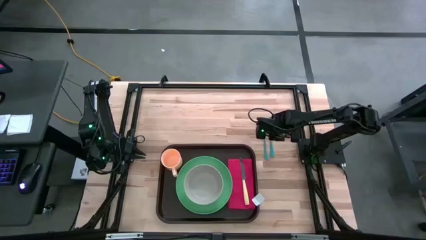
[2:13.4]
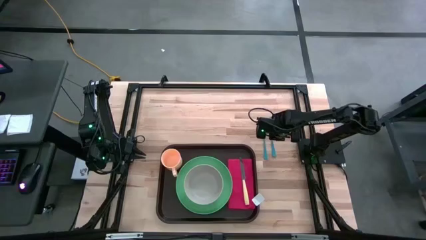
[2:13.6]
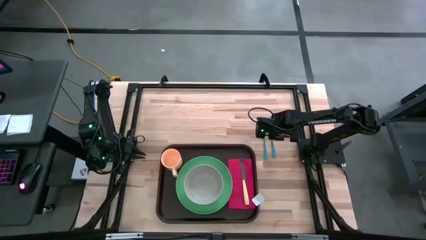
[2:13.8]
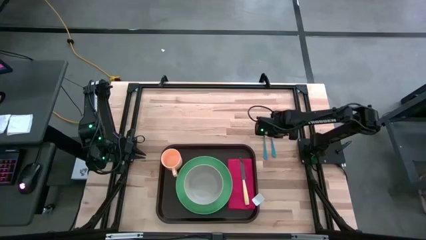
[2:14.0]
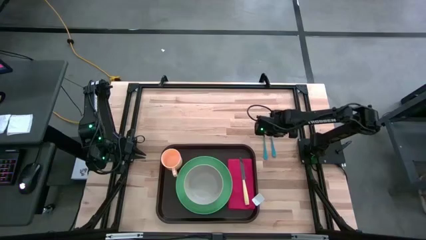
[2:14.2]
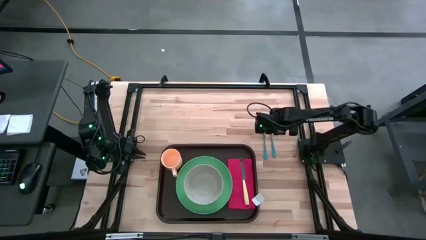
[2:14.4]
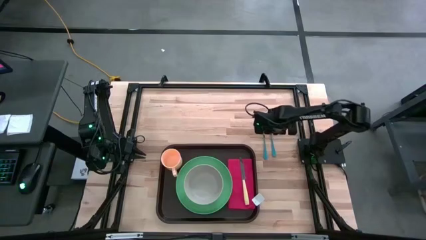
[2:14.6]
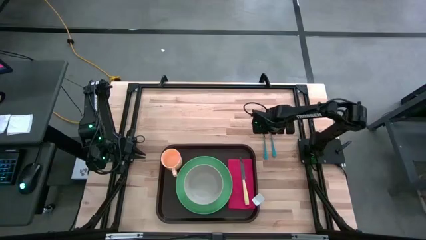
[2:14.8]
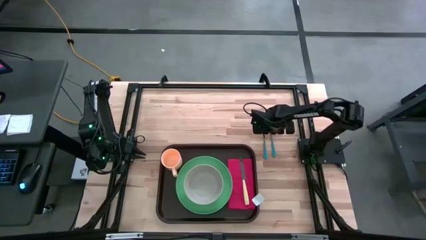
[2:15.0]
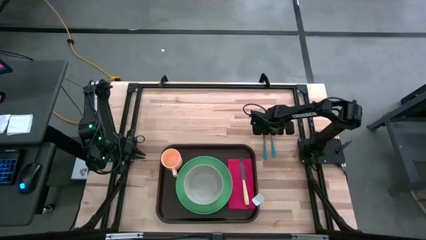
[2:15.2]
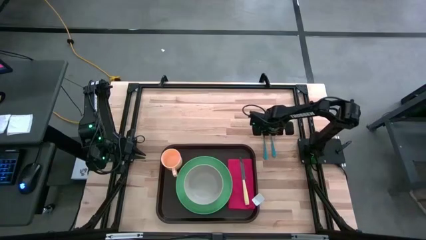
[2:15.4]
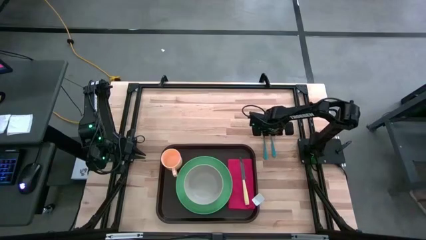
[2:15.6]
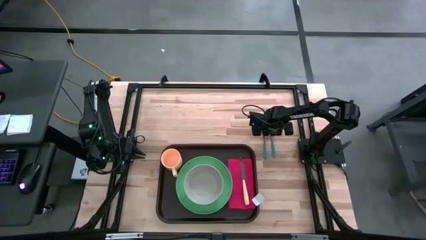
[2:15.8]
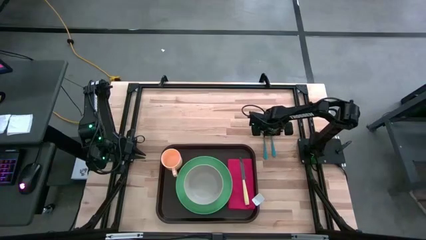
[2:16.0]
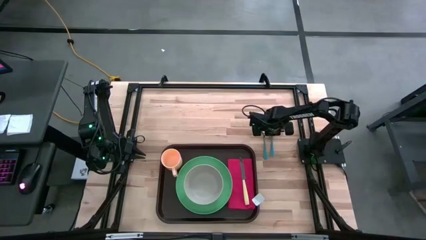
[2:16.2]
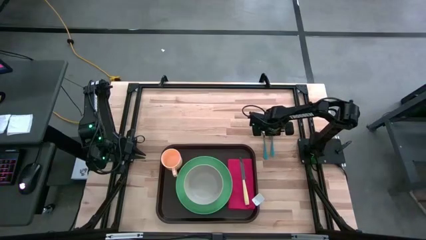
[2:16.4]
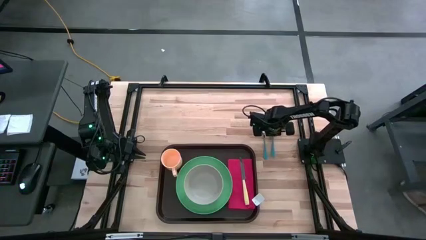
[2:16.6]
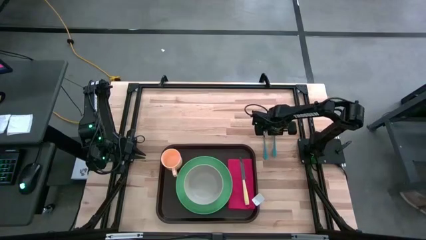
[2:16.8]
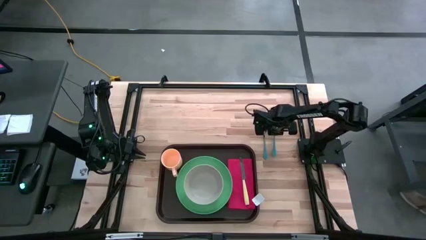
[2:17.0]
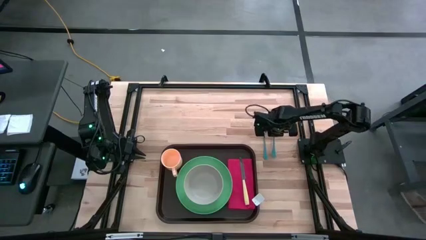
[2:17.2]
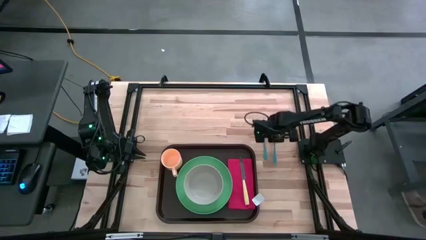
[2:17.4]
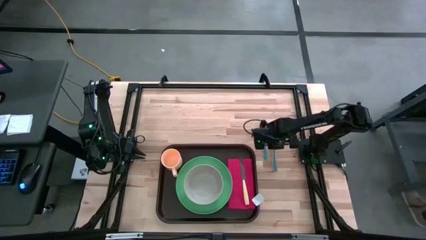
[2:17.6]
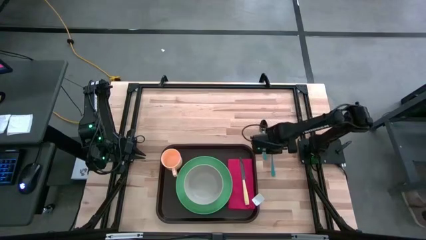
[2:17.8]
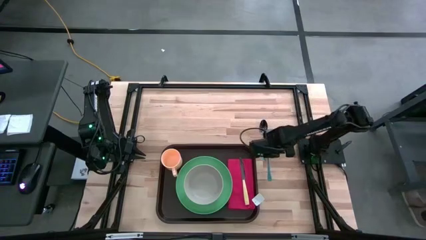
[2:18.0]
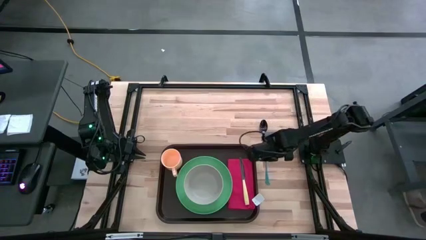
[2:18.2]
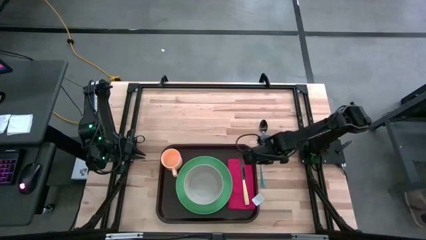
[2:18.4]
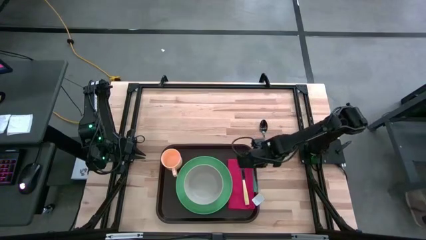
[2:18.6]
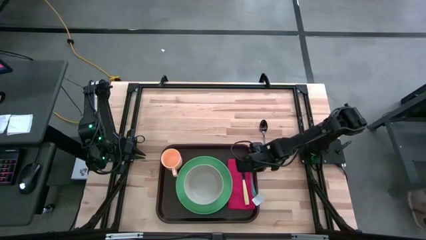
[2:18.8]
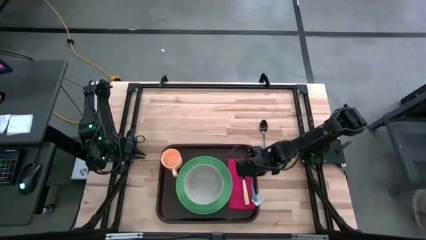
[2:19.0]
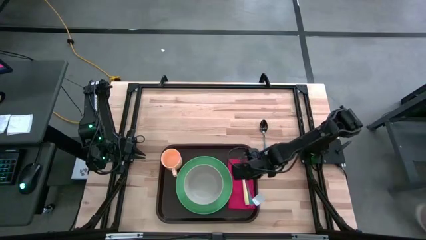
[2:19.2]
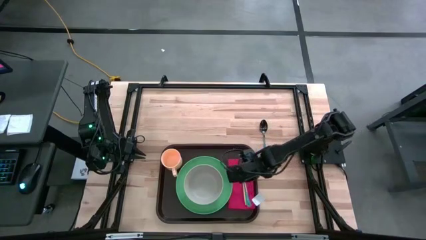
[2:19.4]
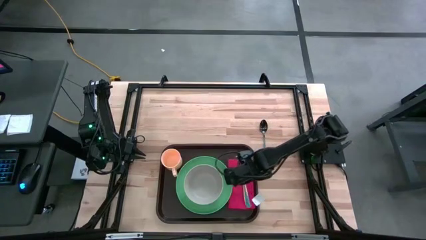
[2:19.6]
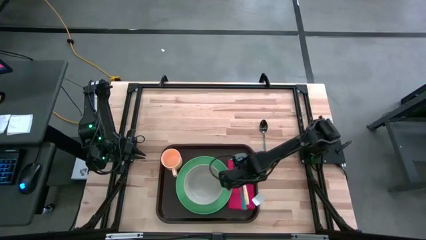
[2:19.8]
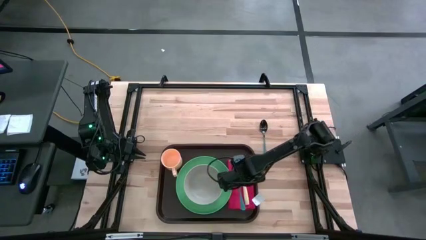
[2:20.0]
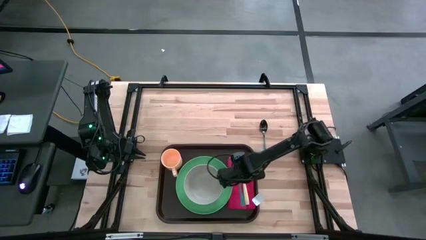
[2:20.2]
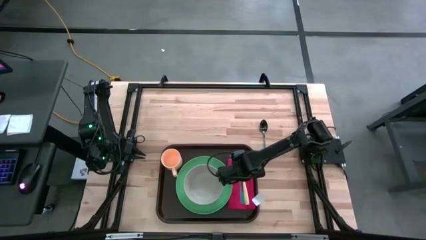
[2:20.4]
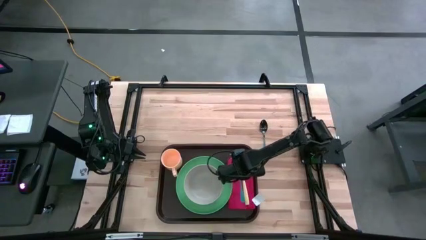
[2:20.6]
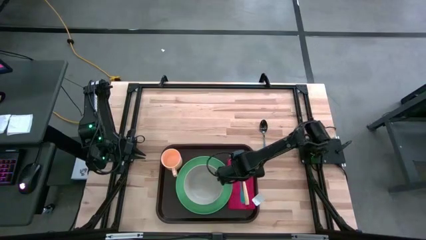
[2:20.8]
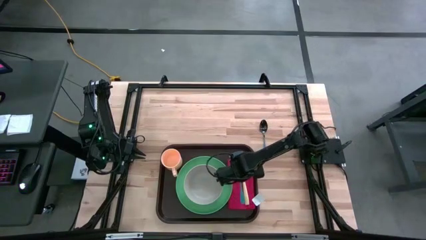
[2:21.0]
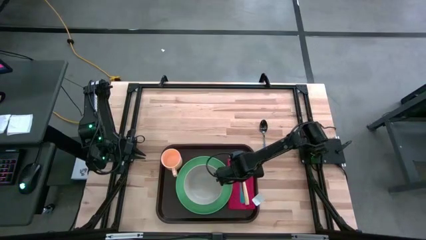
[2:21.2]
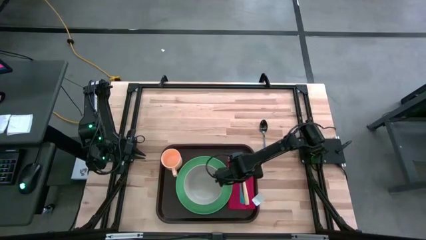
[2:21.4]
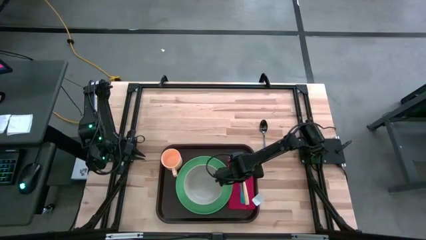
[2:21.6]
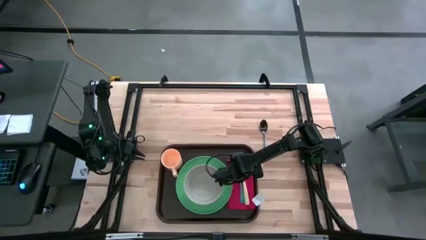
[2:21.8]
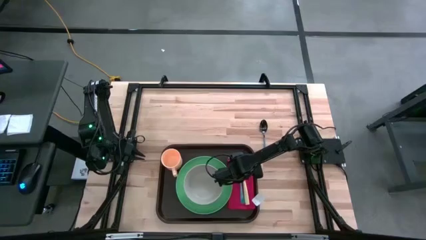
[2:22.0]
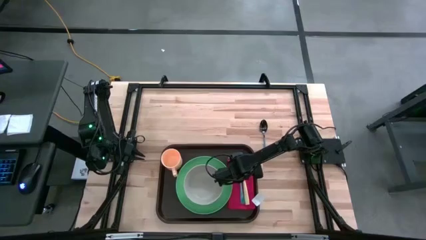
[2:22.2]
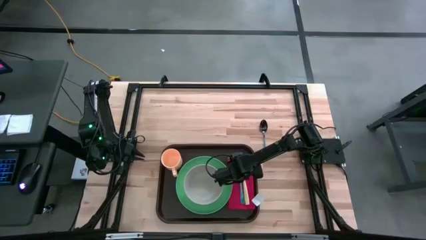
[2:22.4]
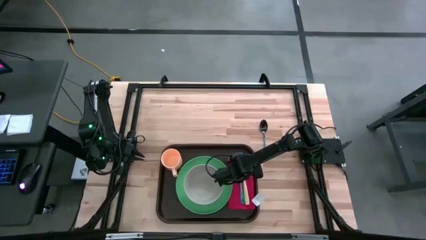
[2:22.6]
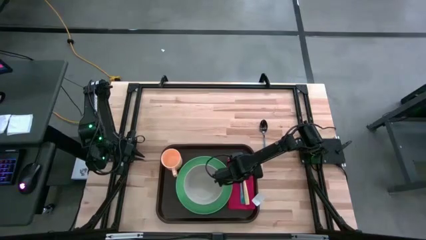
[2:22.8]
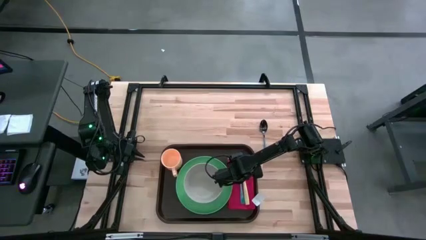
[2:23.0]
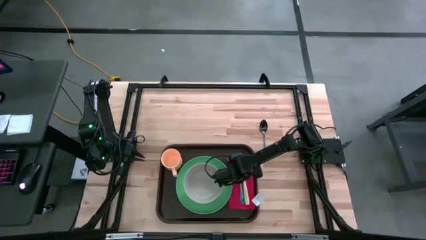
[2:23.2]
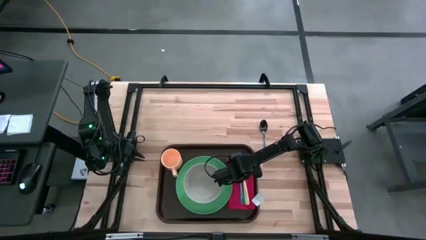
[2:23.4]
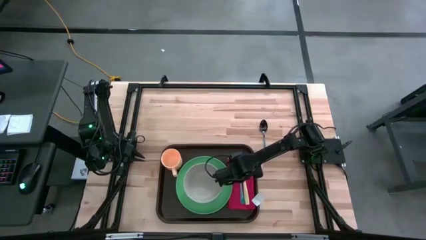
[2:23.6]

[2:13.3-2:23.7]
Task: Set up tray
Put the blue fork on the red napkin to the left side of the yellow knife

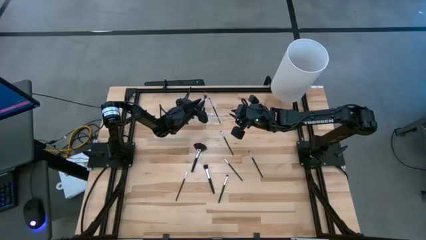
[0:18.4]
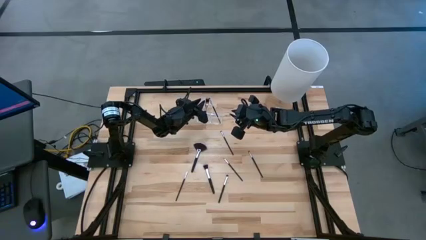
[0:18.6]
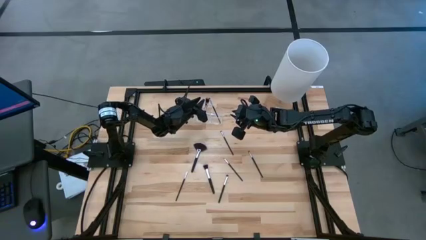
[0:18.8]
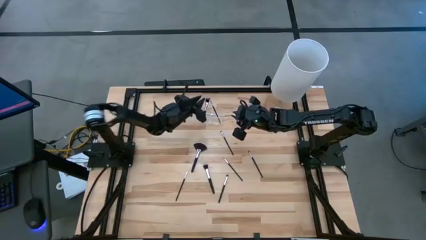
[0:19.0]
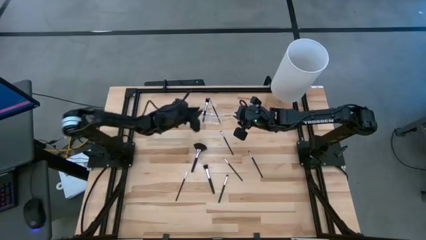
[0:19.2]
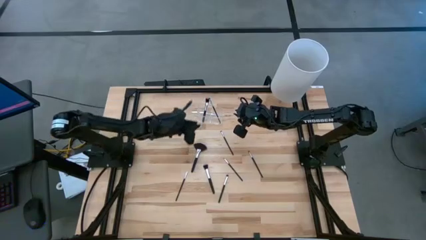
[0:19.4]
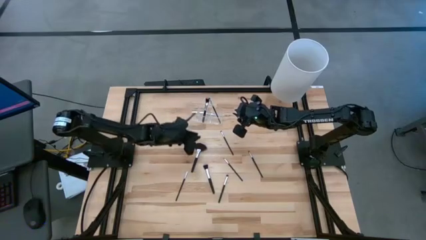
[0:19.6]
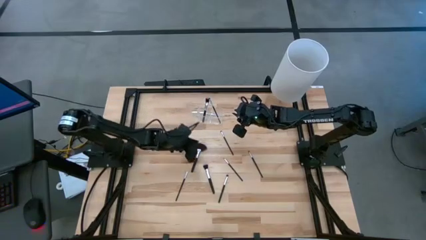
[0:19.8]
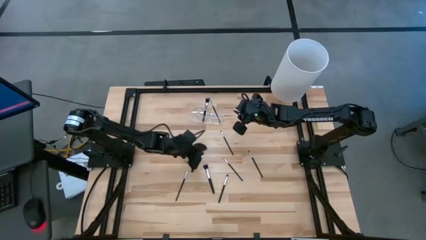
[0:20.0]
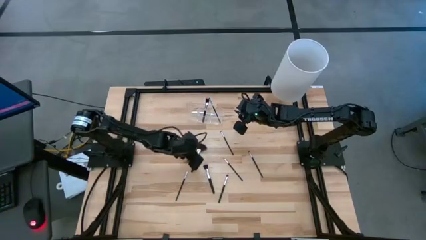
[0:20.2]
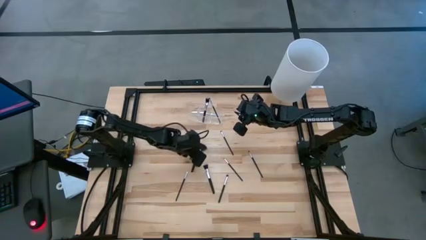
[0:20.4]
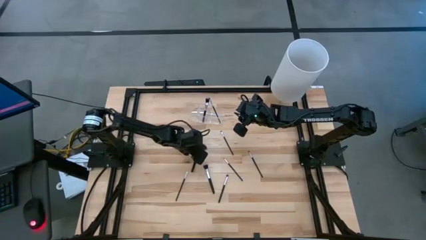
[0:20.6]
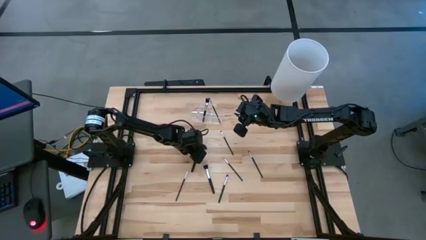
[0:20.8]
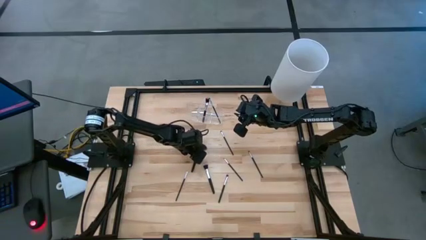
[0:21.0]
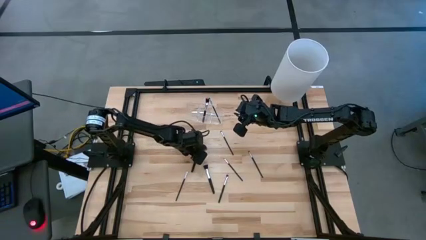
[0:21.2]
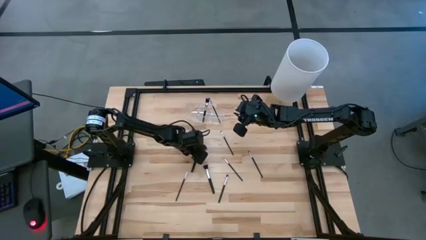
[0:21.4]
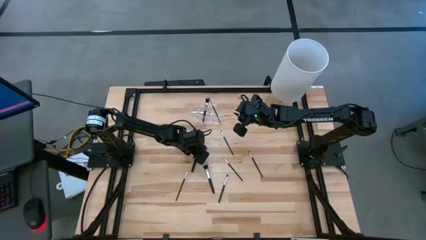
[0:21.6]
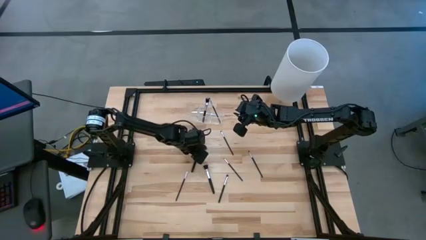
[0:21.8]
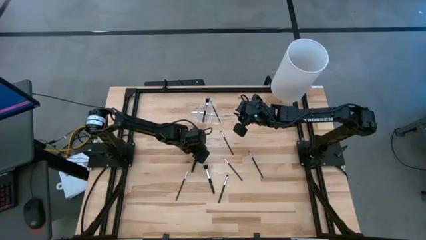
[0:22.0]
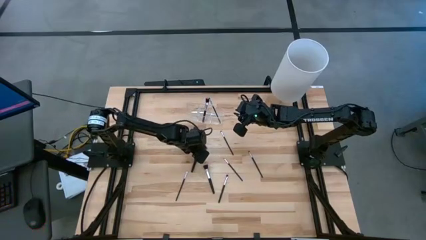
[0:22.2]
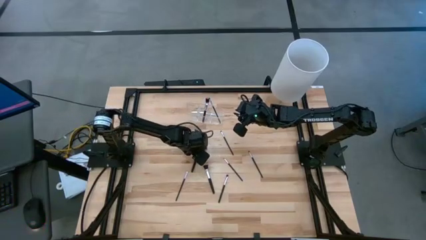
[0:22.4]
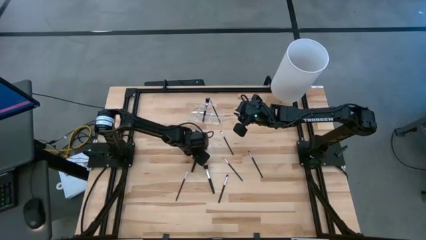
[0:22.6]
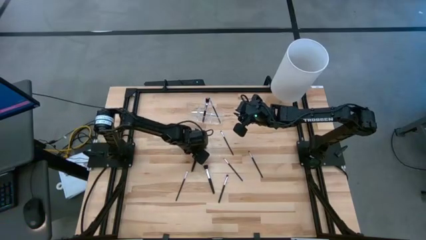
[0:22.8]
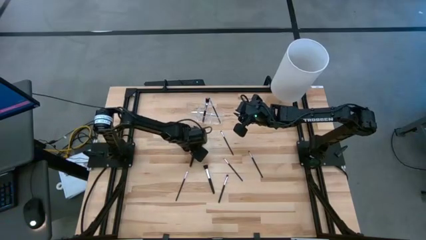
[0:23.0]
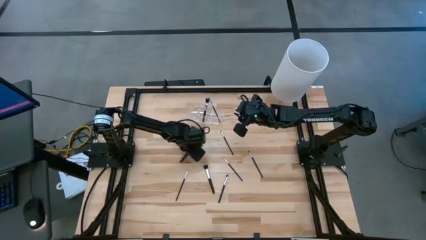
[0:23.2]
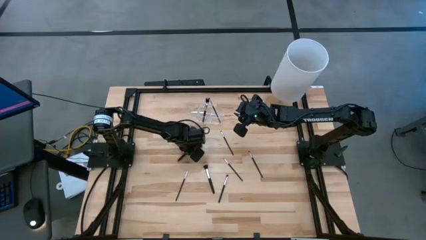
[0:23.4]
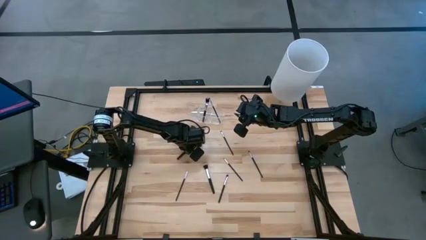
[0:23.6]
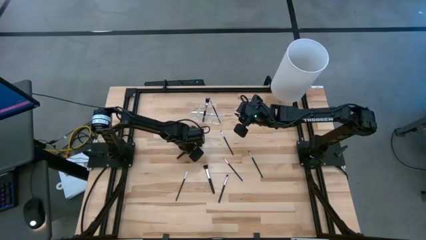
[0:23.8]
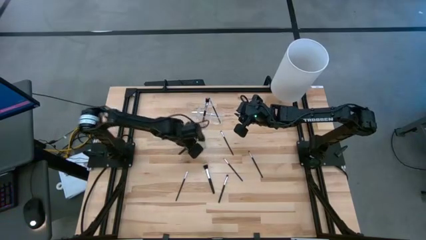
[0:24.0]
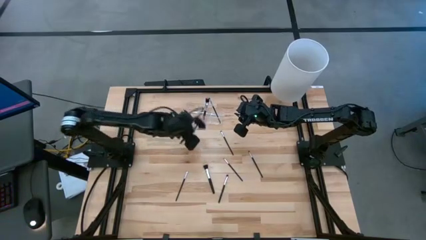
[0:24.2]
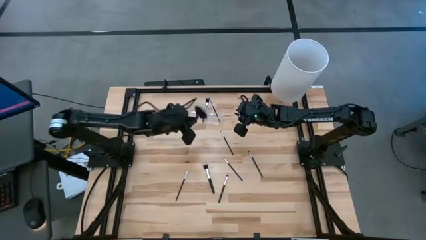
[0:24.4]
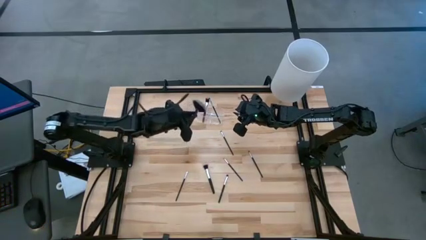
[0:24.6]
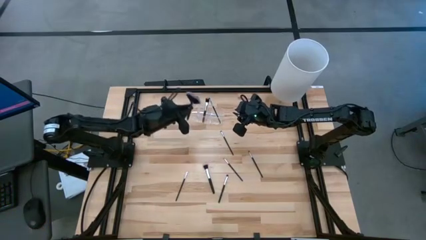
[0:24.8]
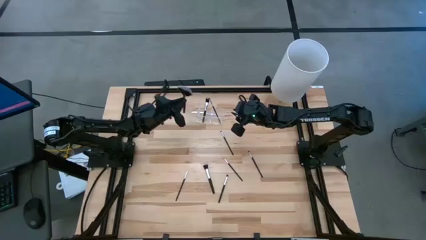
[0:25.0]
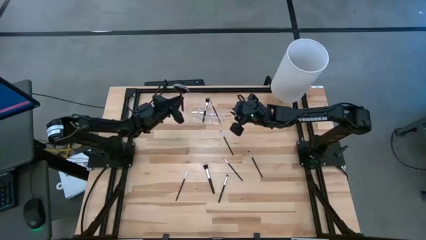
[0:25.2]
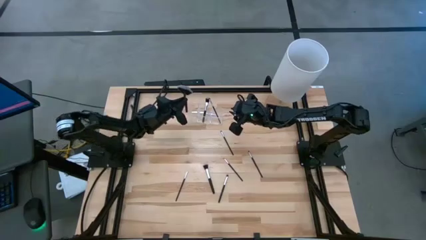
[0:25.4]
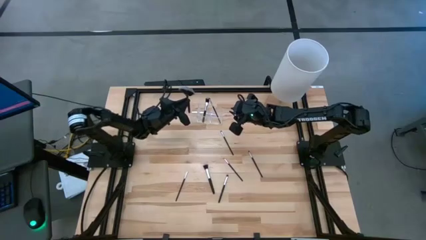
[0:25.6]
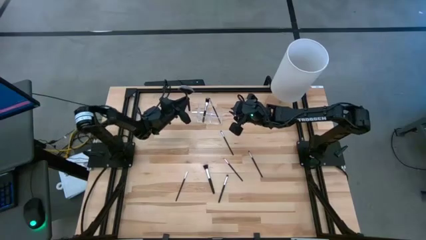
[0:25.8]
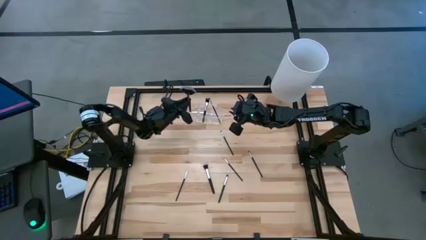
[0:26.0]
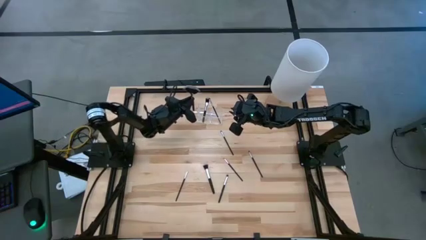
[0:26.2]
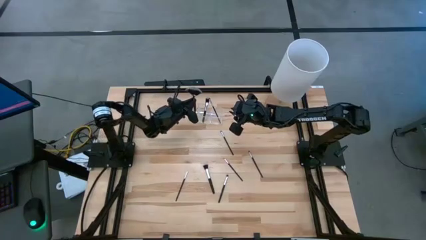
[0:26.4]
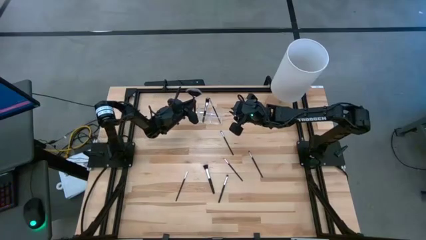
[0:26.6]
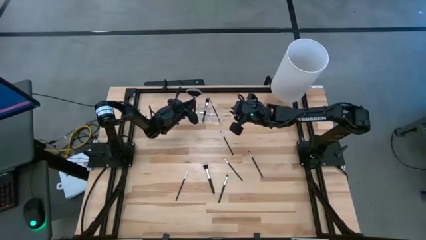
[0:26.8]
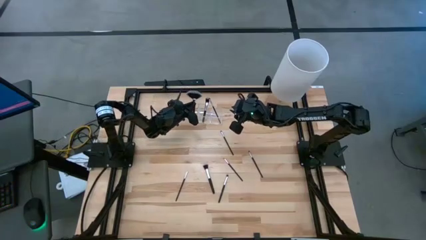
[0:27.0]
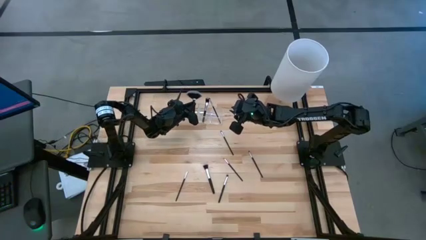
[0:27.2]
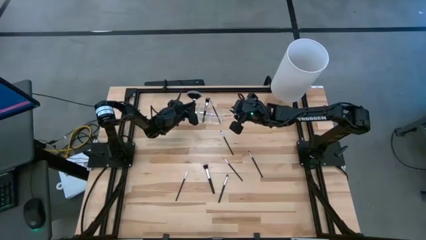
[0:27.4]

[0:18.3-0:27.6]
Task: Pick & Place Makeup Supplies
Put the makeup brush into the transparent organizer
